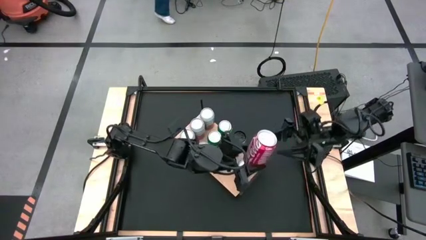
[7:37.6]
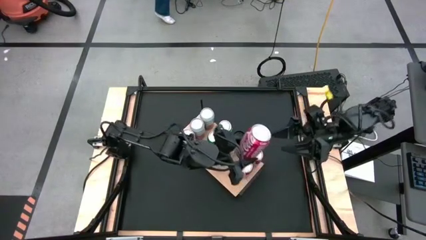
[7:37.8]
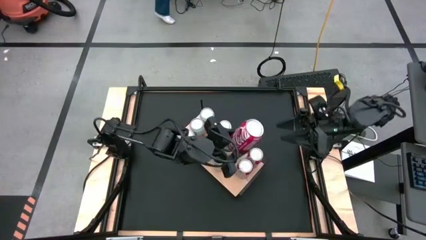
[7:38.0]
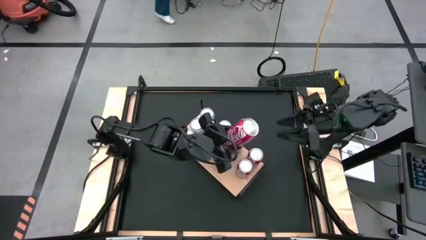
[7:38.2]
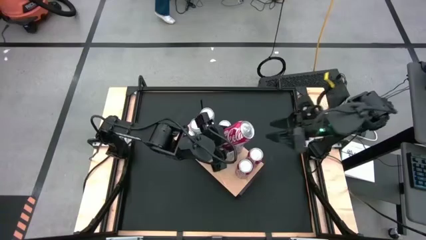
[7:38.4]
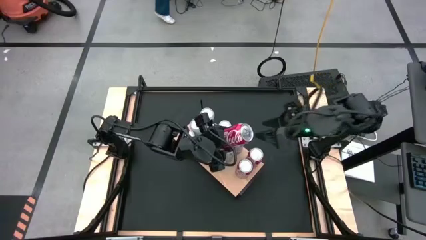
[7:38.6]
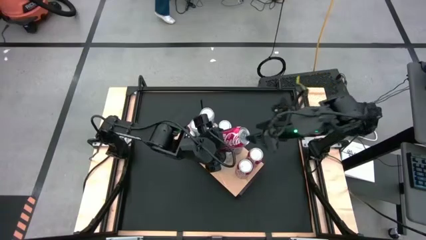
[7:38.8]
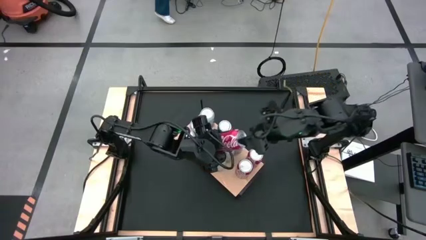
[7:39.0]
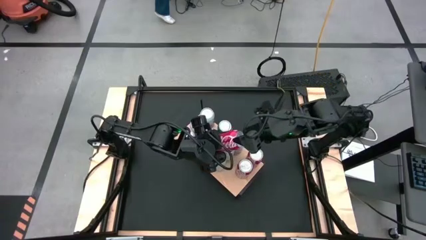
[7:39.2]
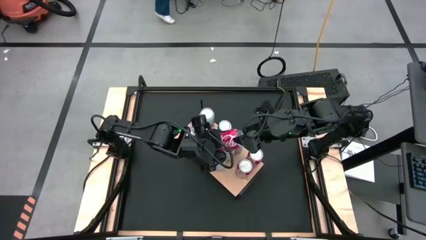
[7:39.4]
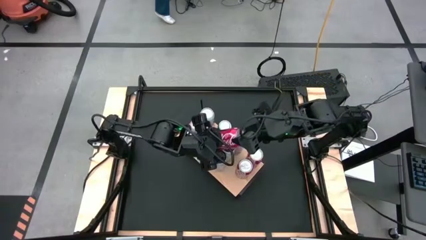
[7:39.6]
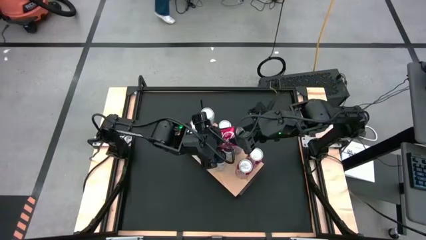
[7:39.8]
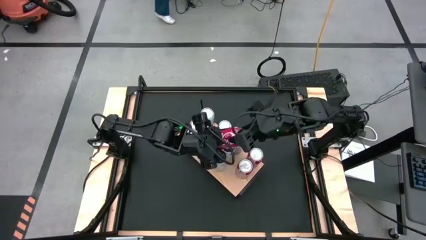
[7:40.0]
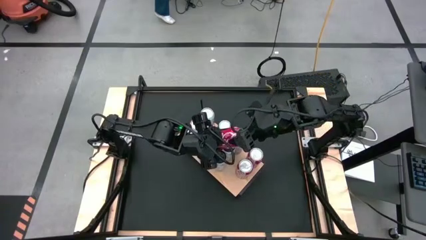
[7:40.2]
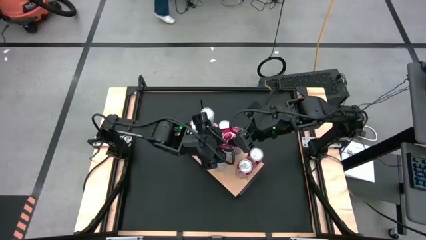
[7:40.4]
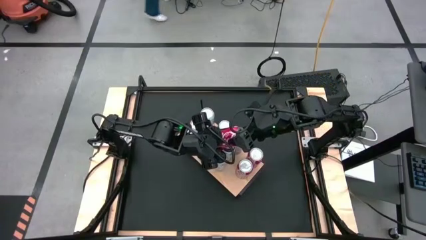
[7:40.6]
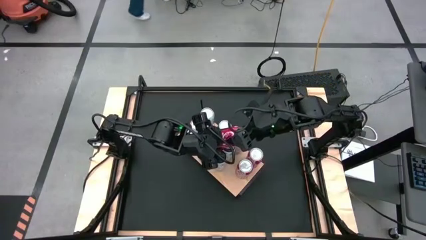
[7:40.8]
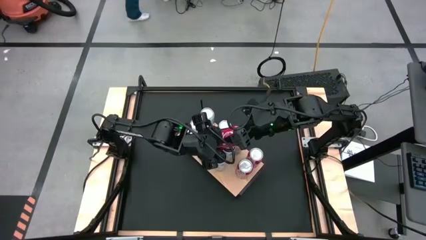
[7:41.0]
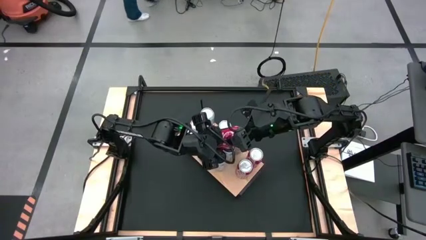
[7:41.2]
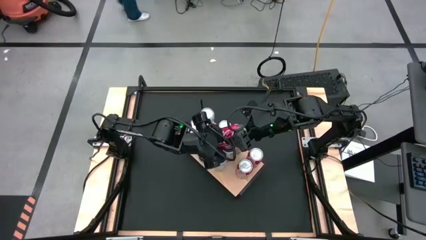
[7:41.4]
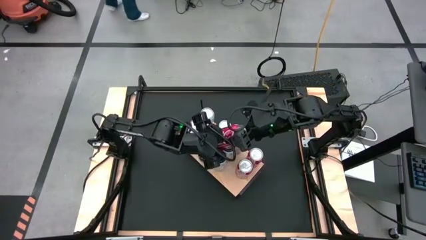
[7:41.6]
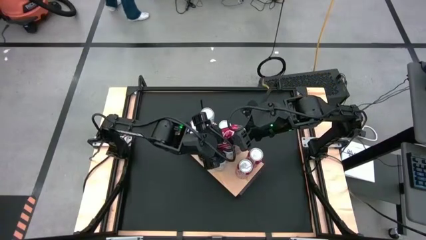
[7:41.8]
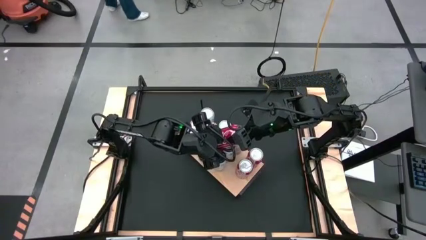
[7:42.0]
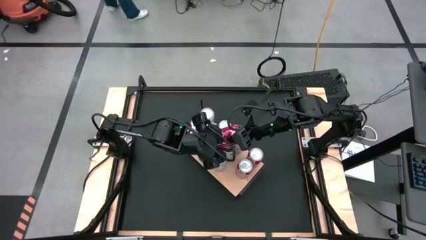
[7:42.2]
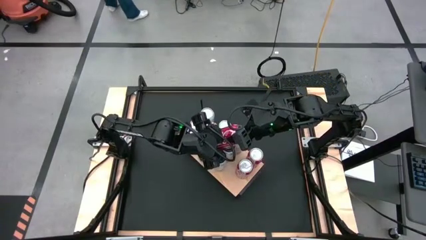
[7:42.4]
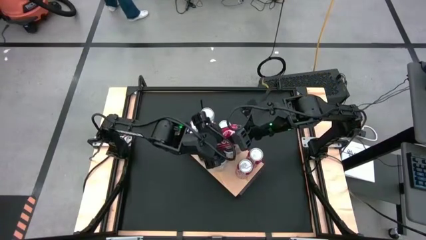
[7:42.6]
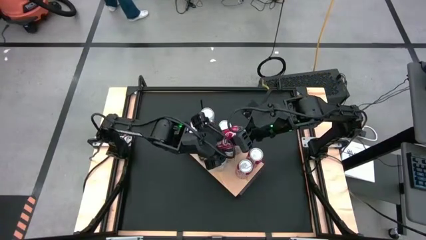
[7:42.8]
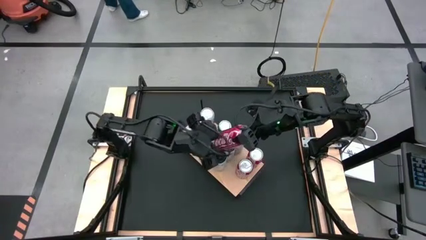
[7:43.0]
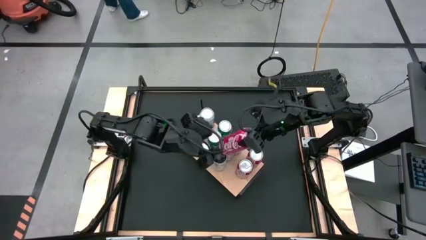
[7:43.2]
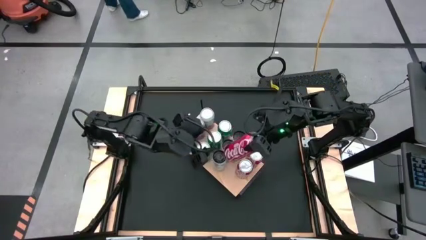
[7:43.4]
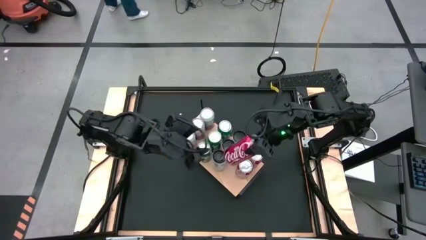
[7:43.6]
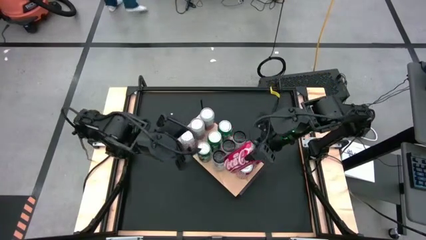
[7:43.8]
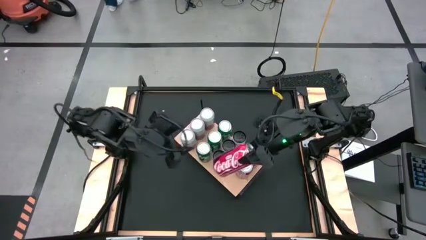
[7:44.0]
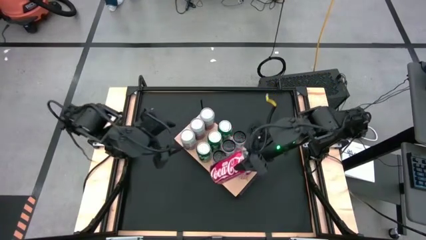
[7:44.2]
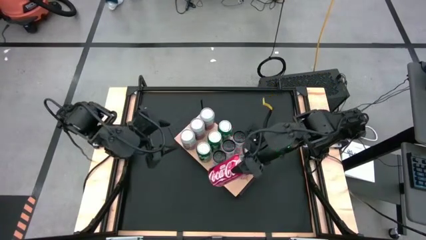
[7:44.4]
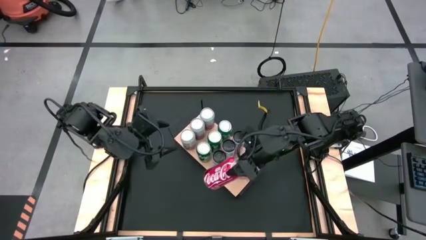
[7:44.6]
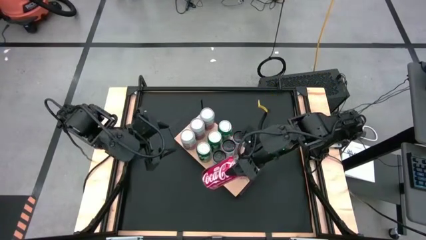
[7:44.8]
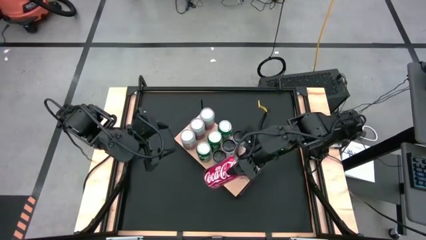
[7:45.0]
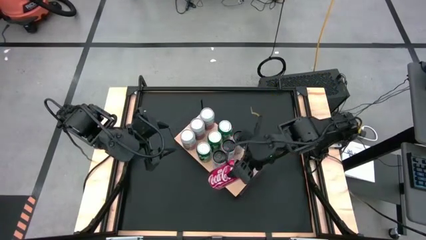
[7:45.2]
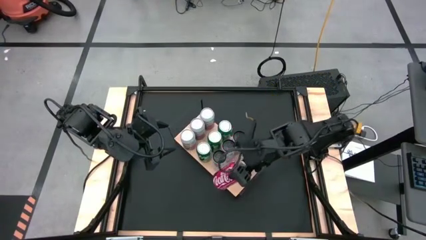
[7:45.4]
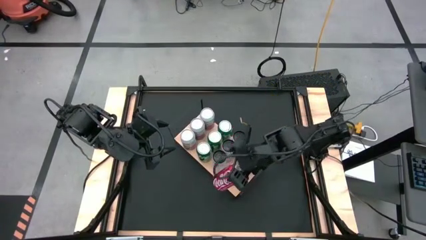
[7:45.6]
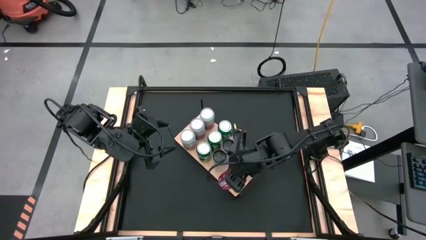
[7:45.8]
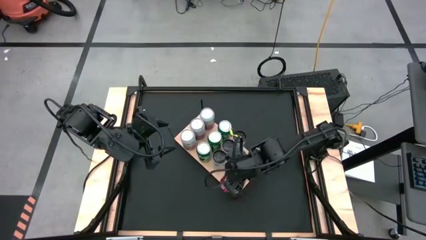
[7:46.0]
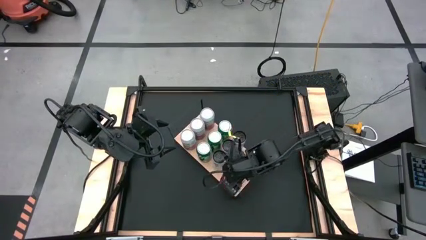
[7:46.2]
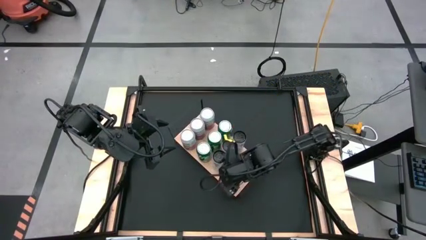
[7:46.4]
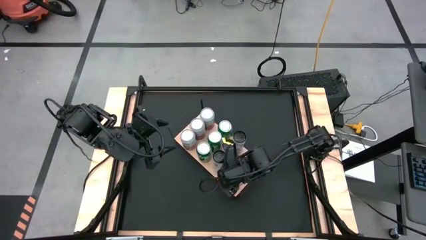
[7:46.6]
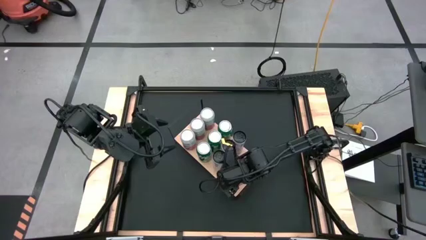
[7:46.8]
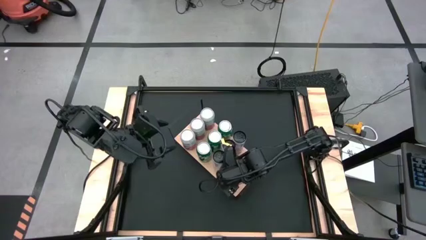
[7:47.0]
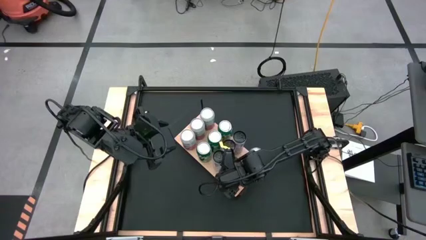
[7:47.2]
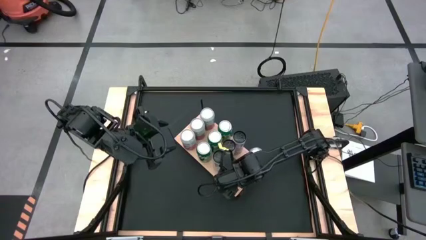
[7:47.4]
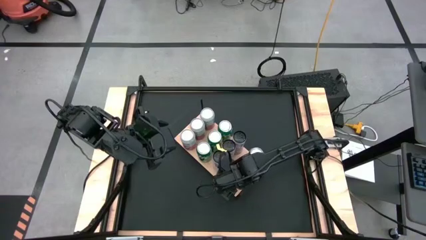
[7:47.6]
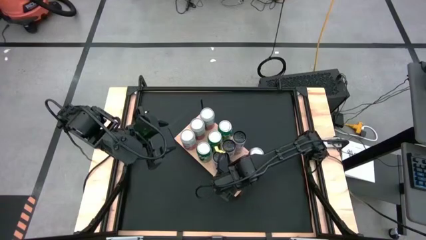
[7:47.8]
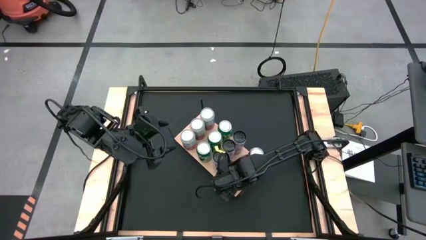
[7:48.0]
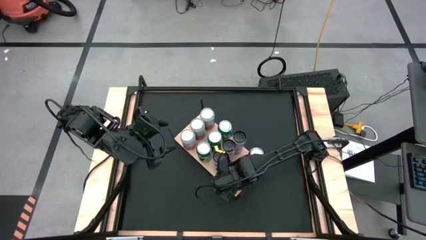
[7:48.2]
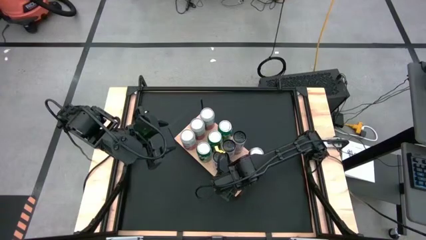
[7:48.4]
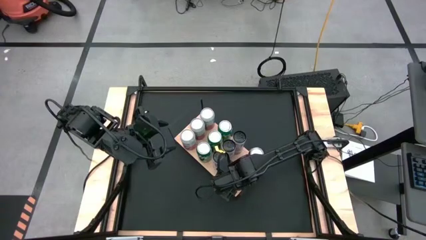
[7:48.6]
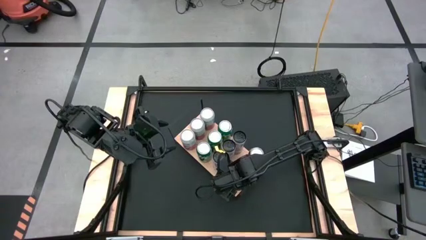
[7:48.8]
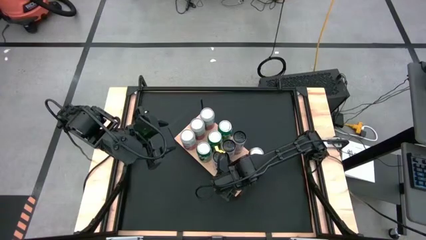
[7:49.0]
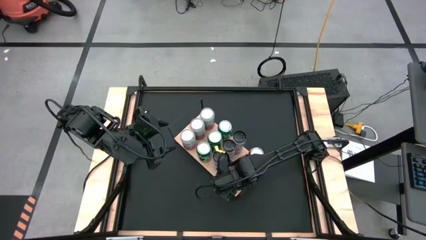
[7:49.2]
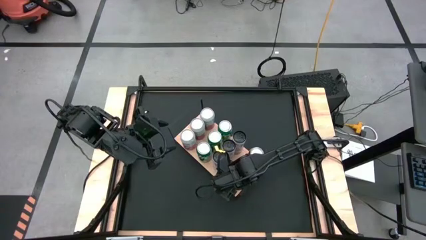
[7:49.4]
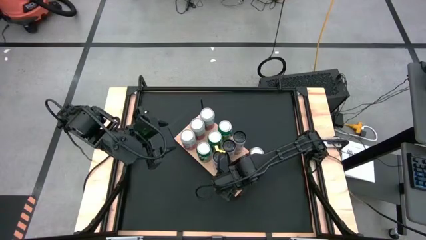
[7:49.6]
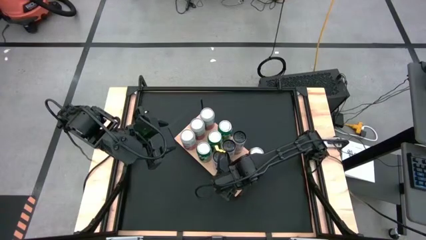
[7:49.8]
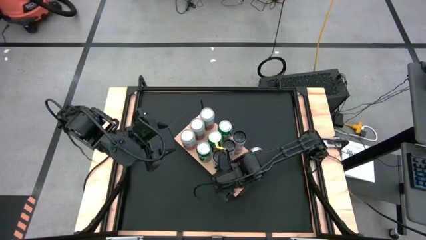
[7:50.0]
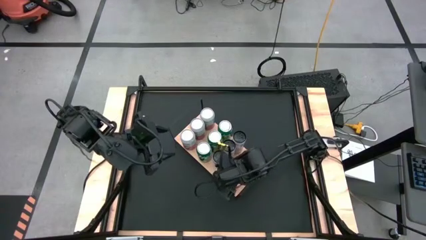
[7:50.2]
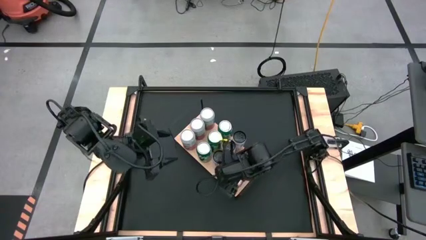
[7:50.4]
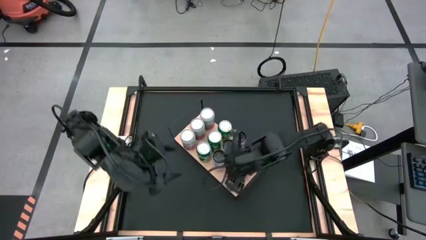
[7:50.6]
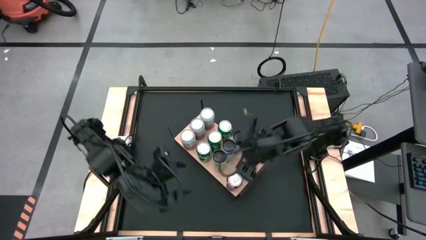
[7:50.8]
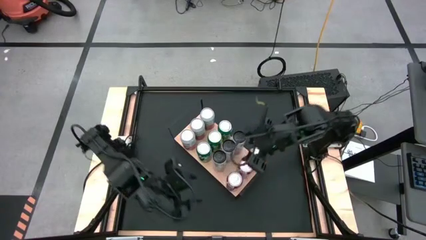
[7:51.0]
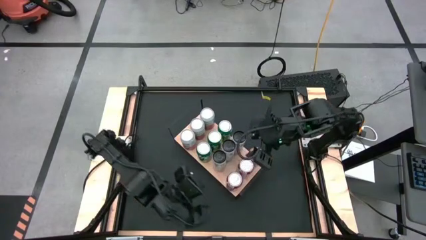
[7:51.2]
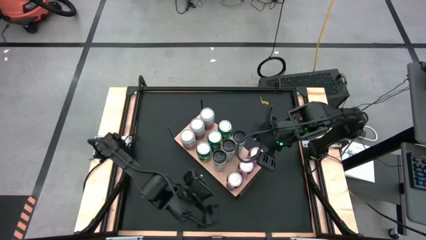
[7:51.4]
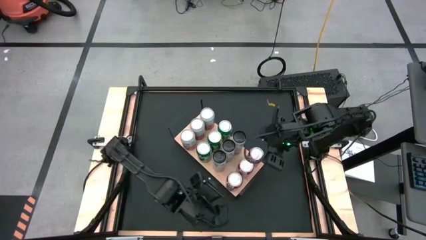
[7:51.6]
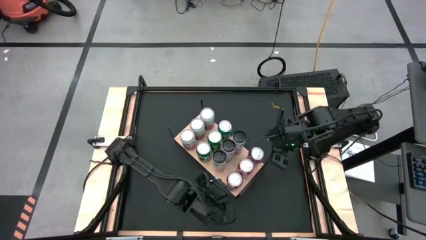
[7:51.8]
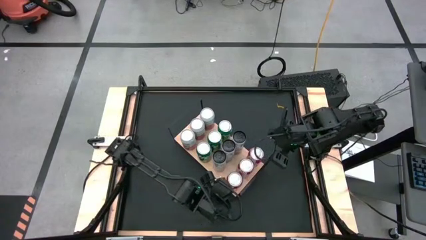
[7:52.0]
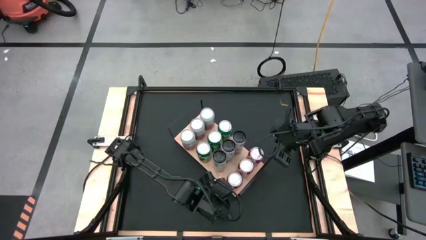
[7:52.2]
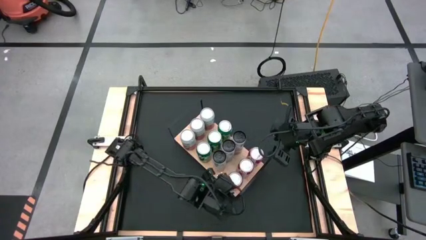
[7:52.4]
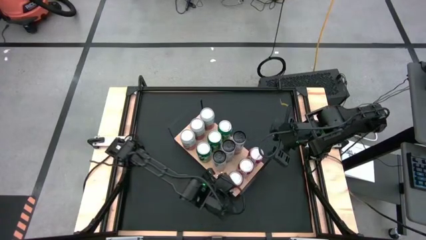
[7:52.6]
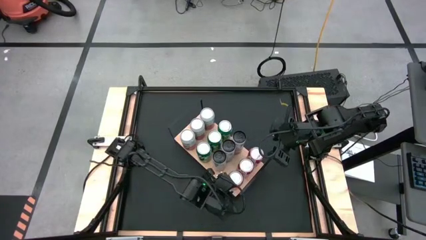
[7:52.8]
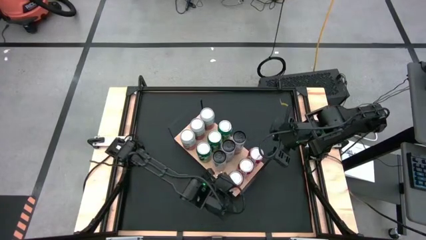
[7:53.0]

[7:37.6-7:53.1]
Task: Place canned beverage on shelf
Put the red soda can aligned with the other red soda cans
